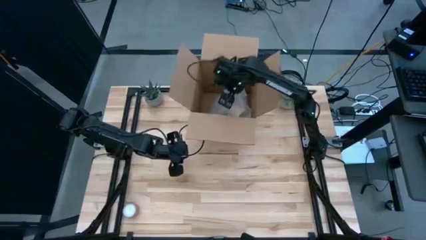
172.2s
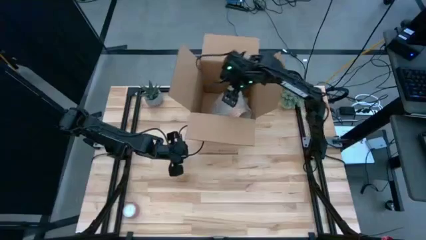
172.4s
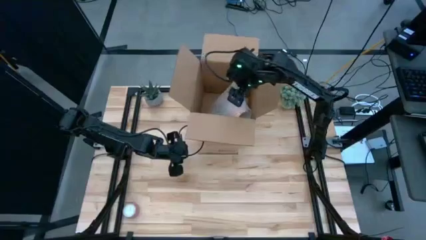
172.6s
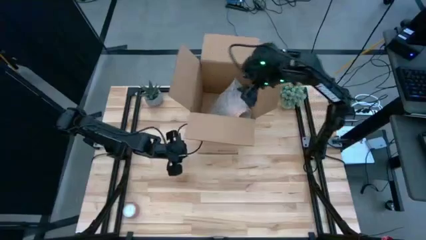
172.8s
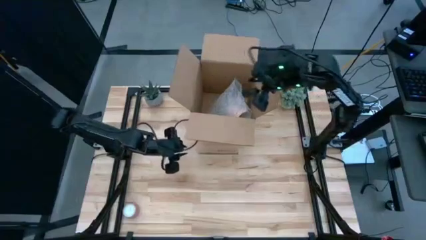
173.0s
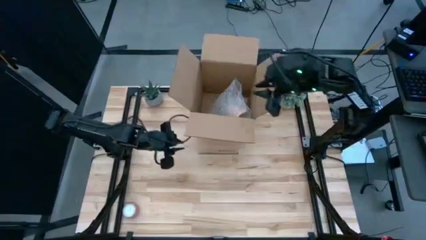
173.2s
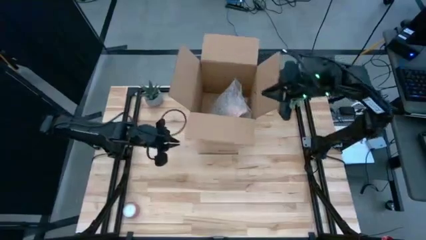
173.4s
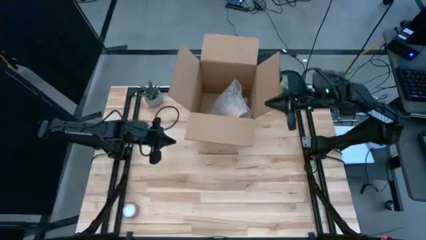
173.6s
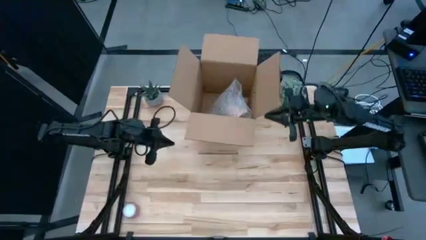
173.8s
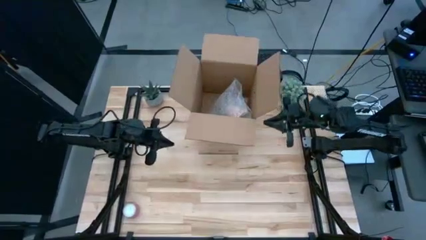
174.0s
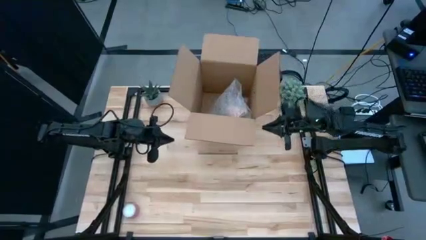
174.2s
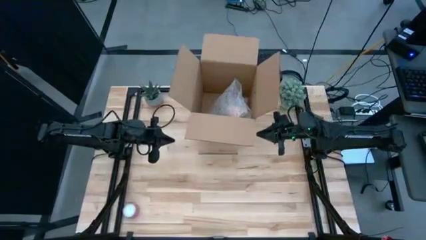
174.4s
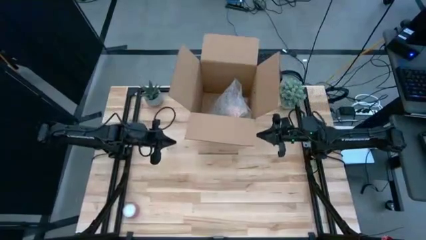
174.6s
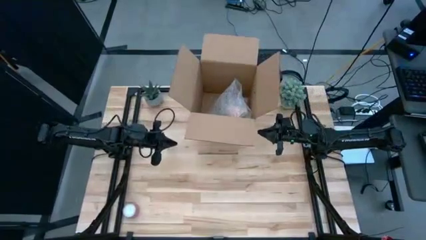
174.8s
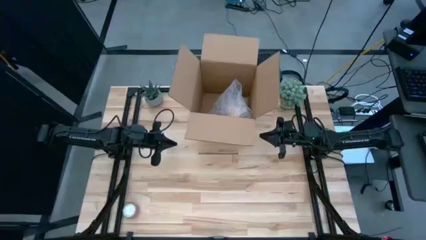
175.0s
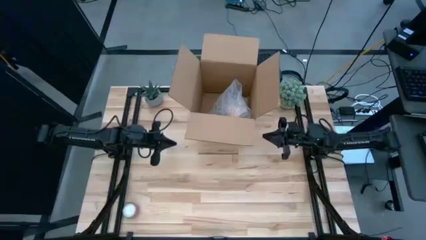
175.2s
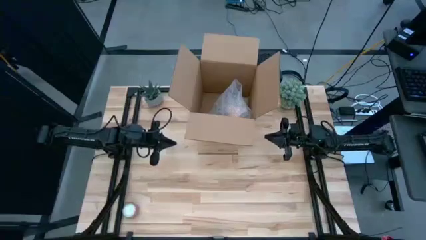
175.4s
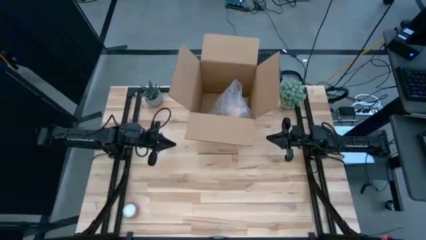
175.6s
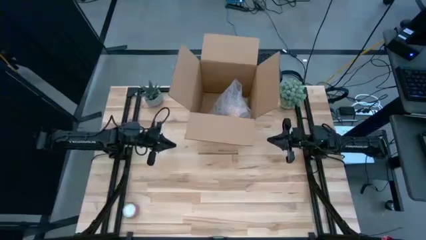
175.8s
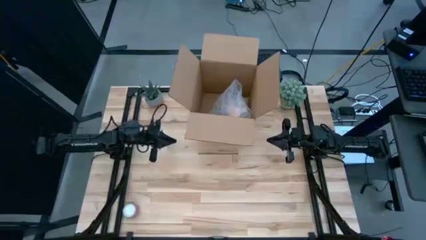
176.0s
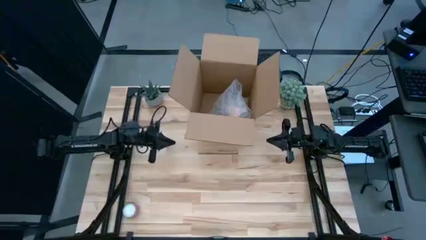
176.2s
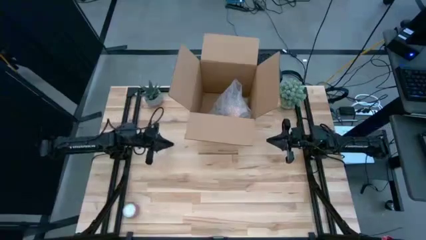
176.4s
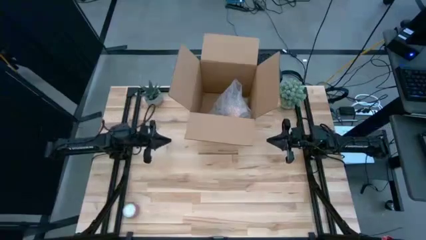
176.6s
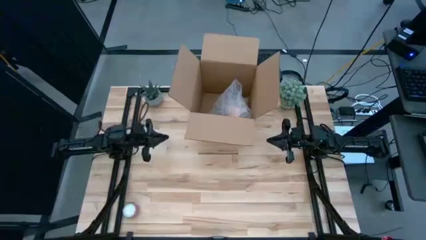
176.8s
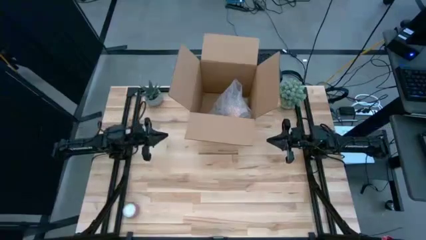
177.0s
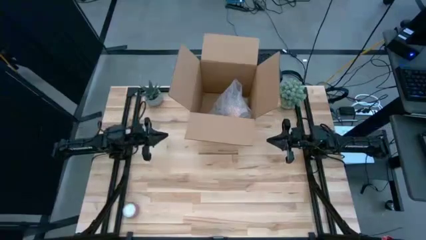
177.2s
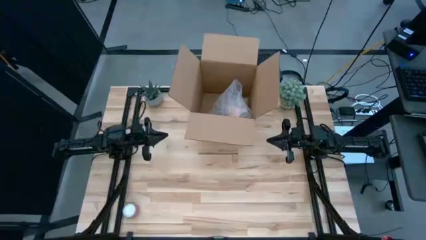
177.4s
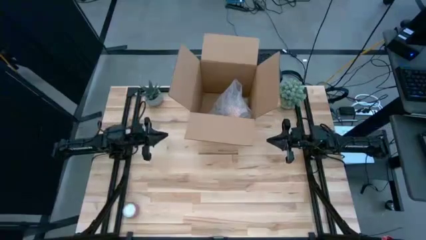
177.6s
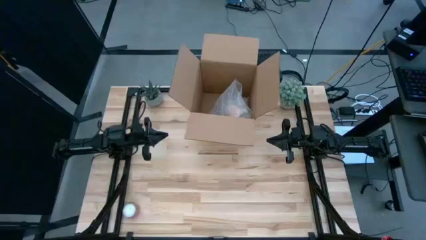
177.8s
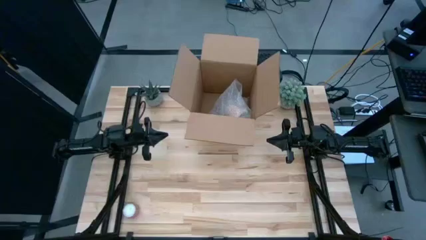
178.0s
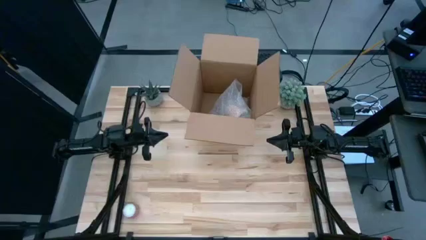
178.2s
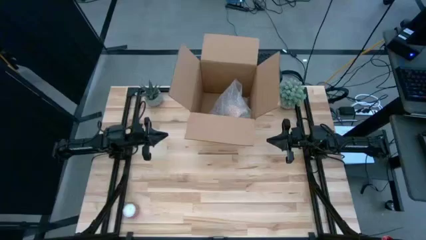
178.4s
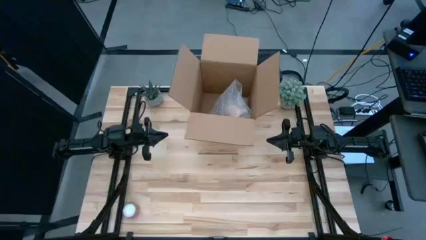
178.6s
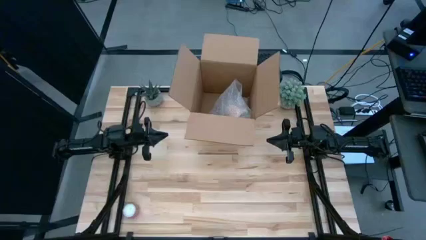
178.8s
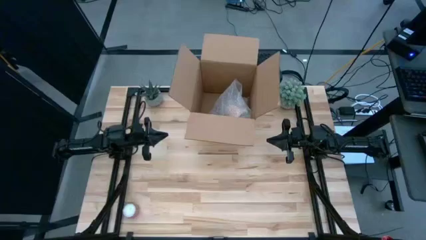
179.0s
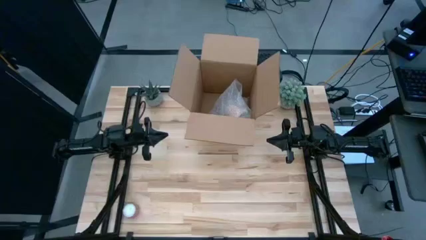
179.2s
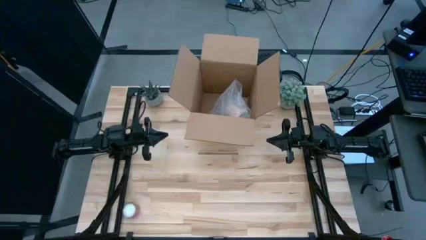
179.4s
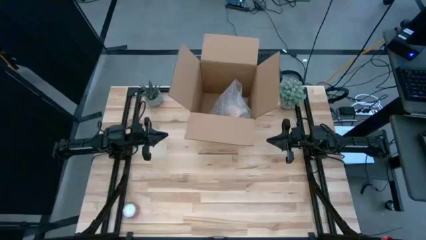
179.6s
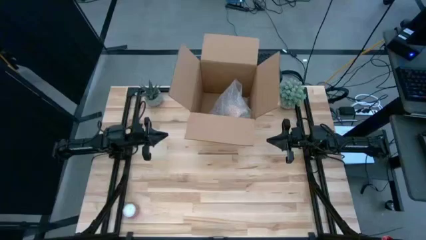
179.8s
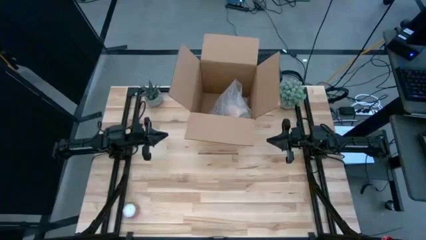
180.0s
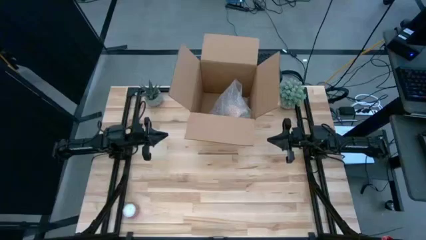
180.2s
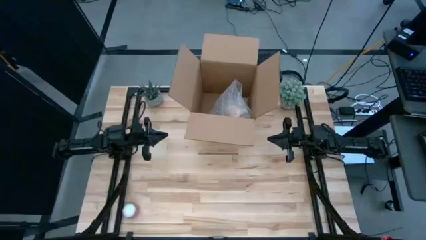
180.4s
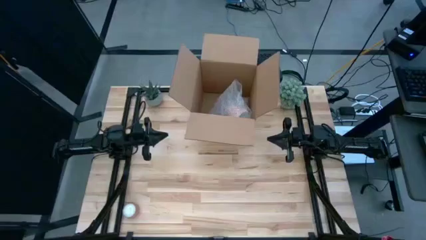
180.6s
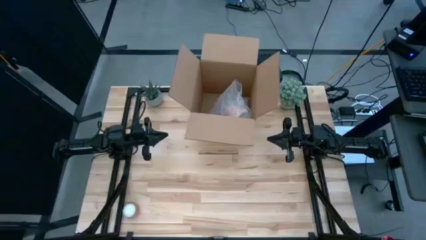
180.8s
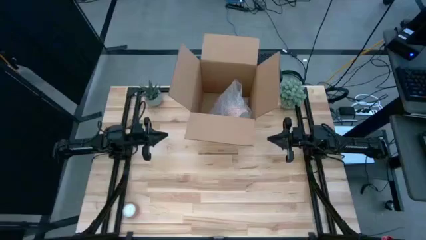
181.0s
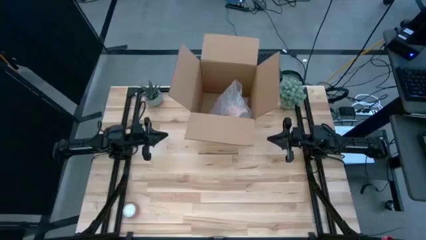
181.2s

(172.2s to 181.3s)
Task: wrap mug
Return to Home Position

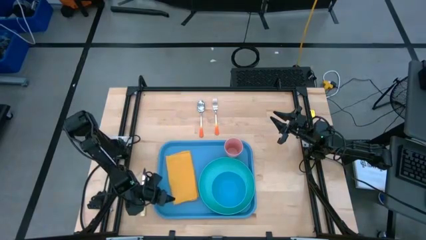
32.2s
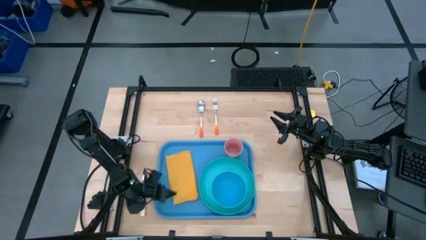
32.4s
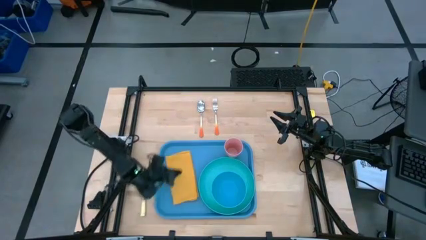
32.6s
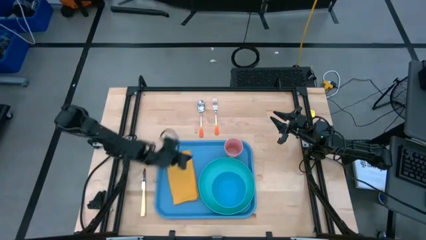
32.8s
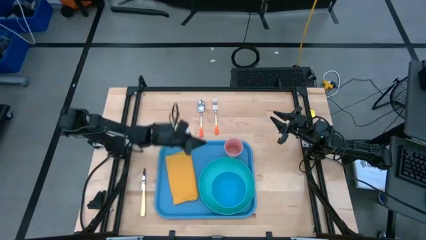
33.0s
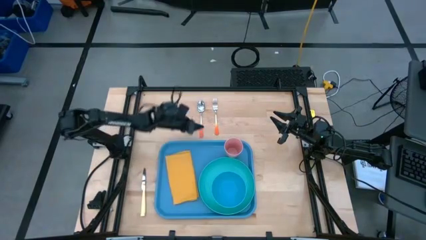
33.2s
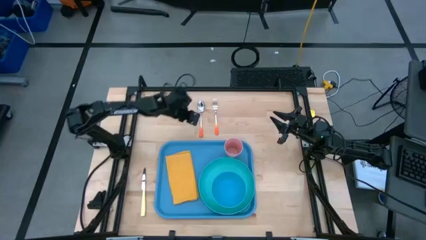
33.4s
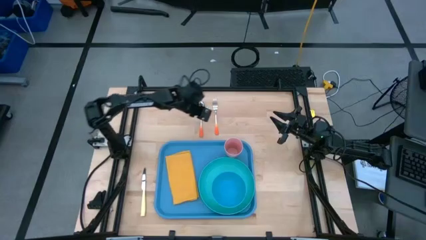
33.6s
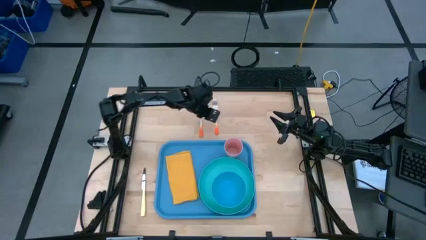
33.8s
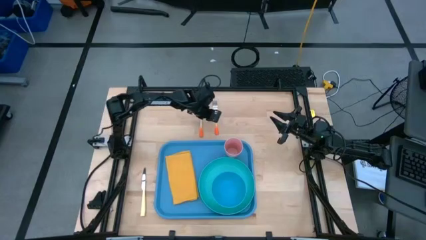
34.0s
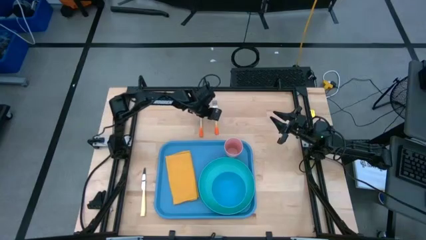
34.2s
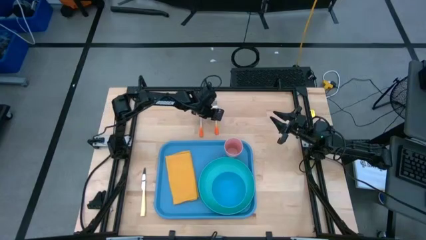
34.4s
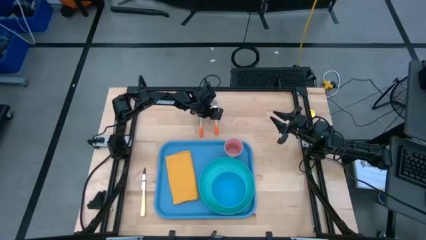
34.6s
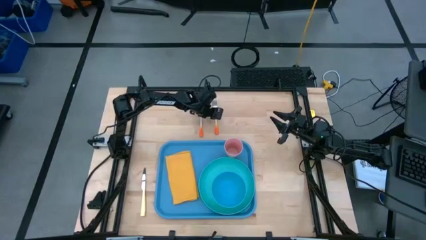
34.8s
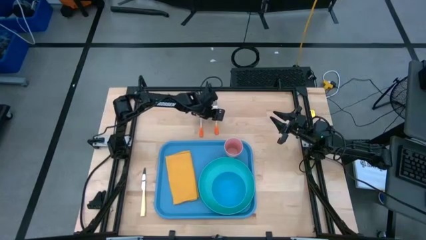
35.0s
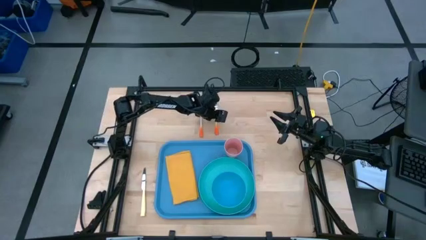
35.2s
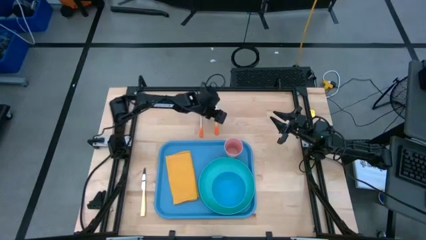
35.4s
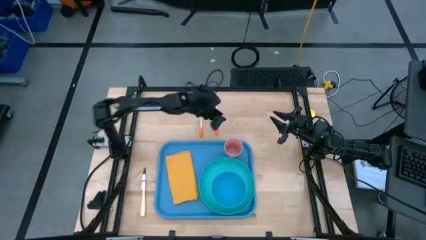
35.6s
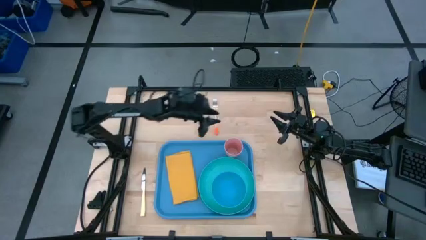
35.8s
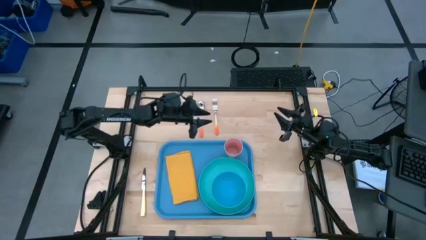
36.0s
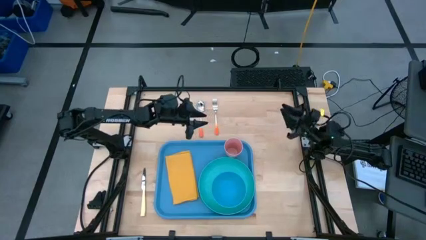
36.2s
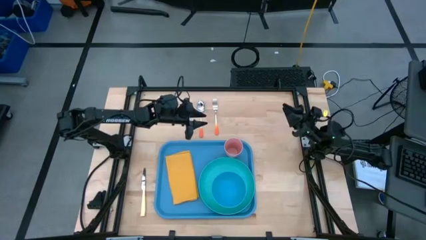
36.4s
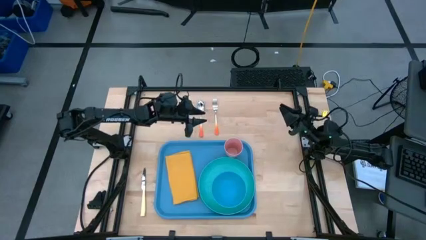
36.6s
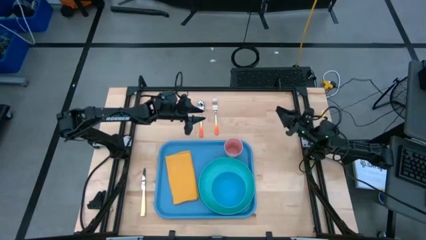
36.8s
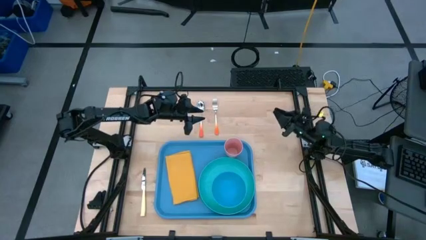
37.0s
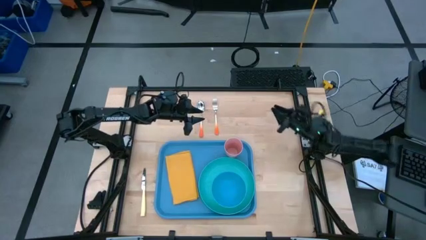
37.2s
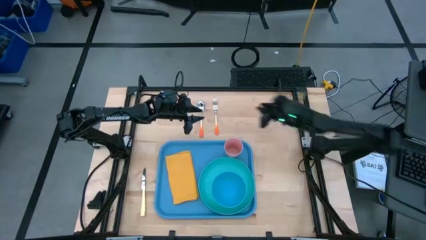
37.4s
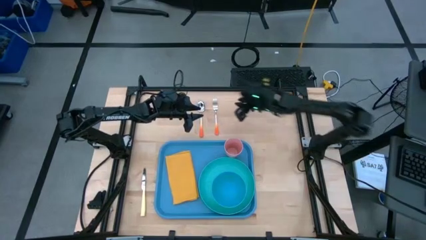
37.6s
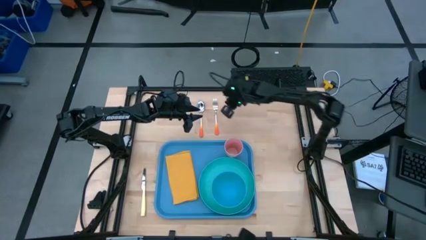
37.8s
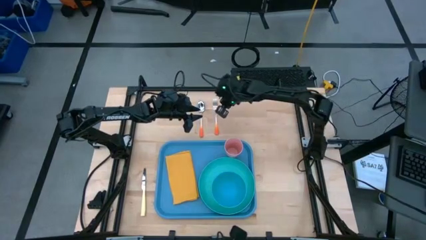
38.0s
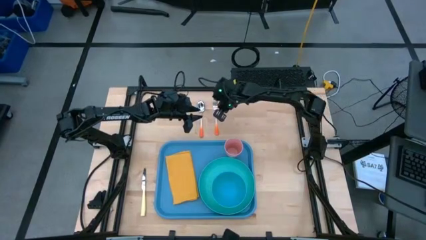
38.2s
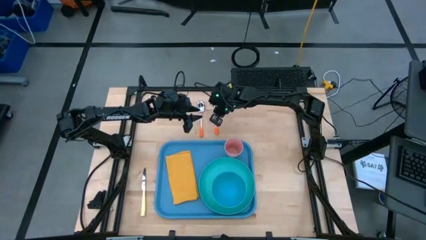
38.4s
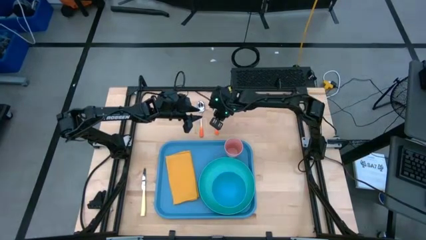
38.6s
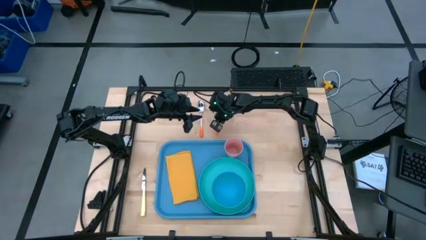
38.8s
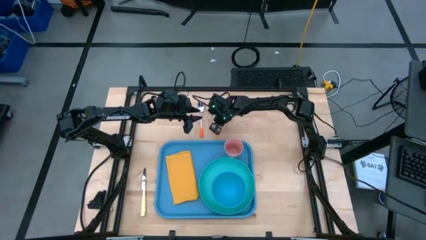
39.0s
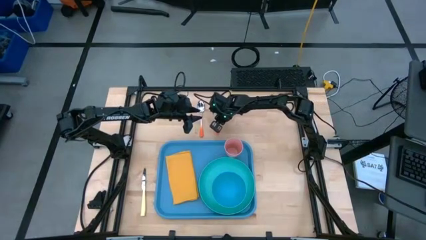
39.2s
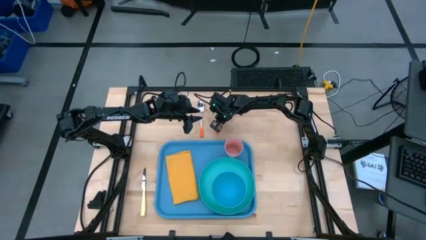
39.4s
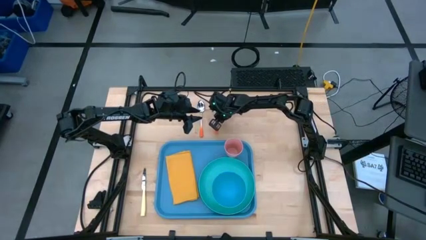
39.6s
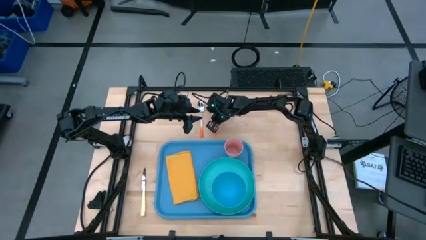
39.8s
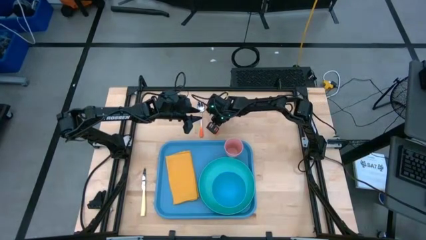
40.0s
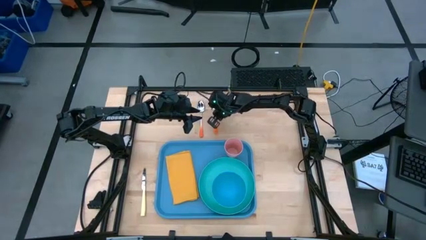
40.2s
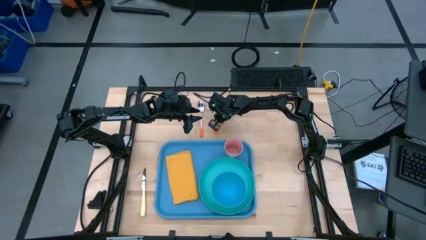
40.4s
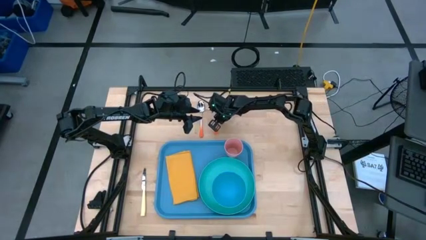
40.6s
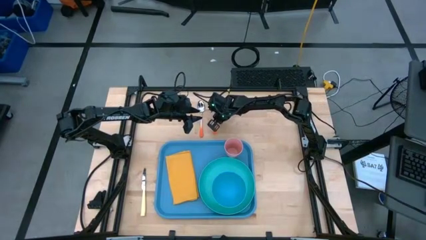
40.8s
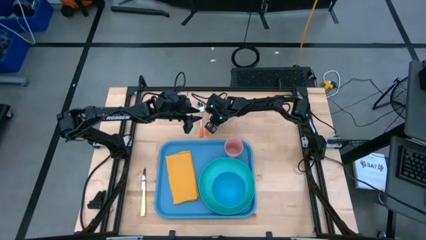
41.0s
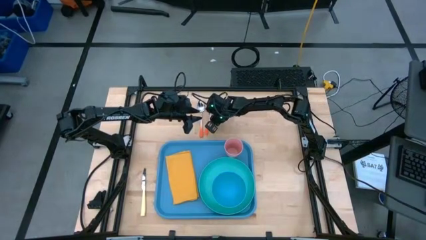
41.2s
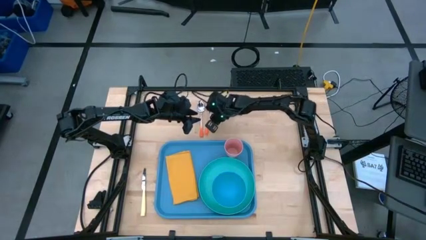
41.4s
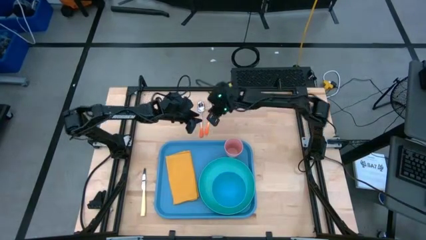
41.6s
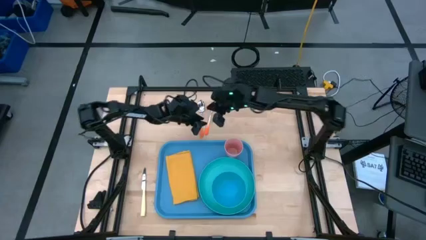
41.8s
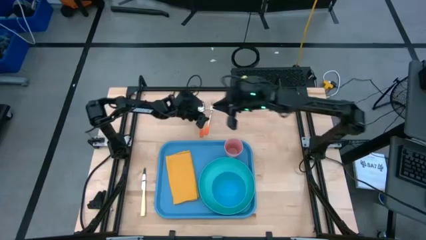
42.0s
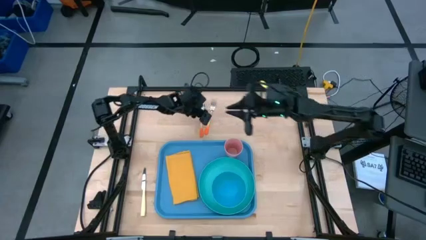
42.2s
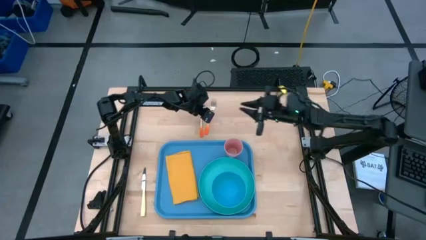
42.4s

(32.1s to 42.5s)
Task: Set up tray
Put the orange fork on the yellow napkin
